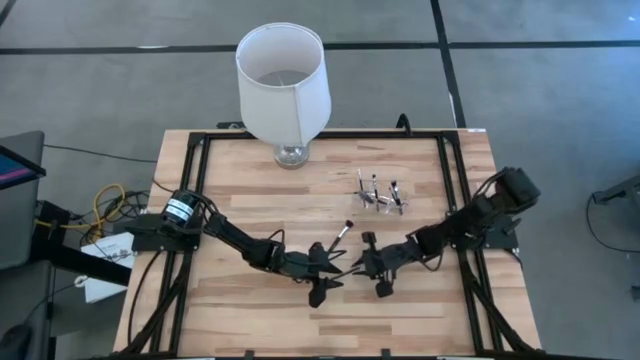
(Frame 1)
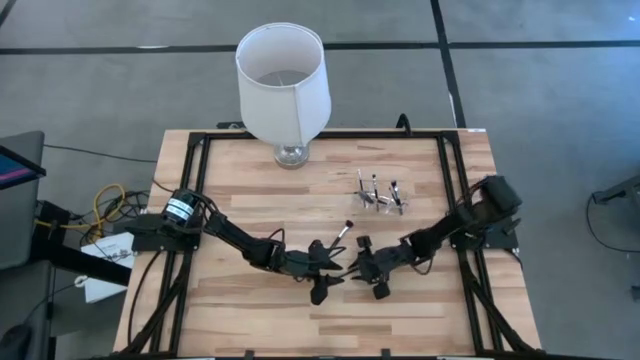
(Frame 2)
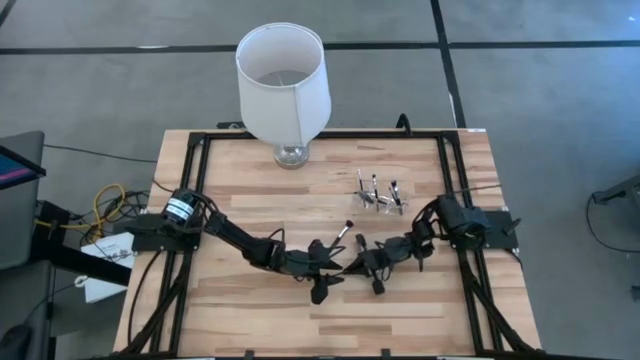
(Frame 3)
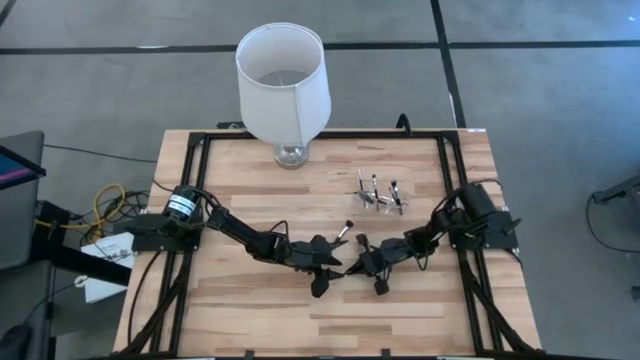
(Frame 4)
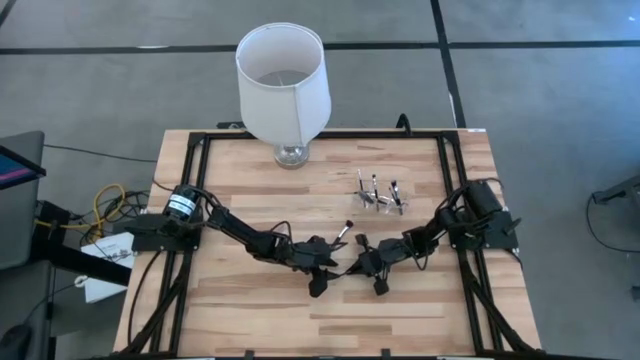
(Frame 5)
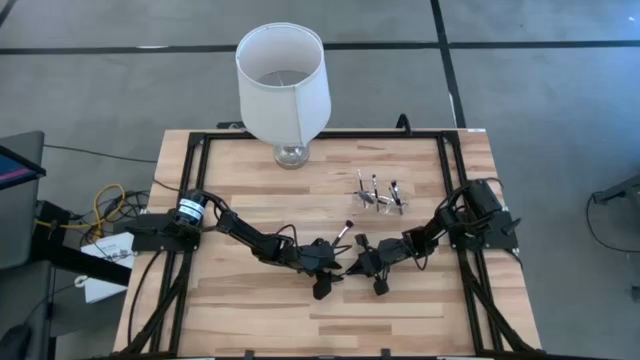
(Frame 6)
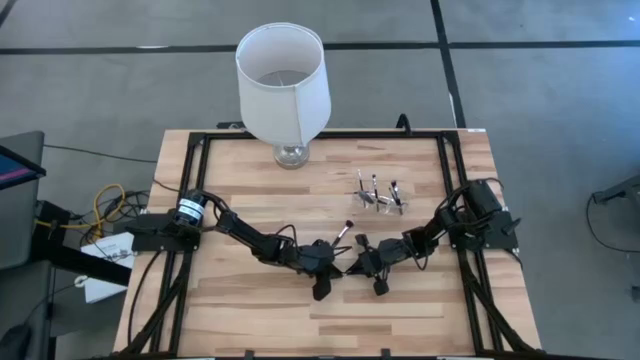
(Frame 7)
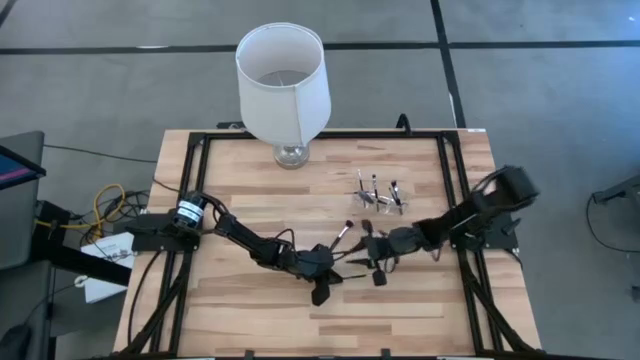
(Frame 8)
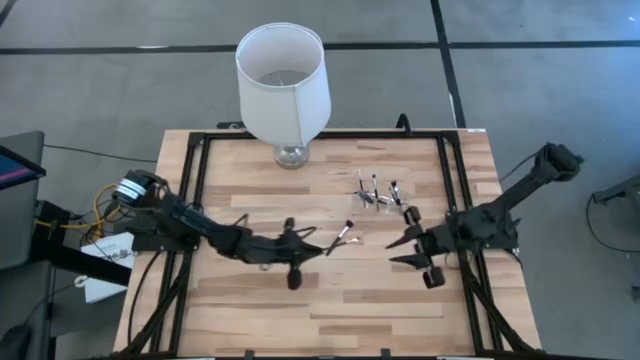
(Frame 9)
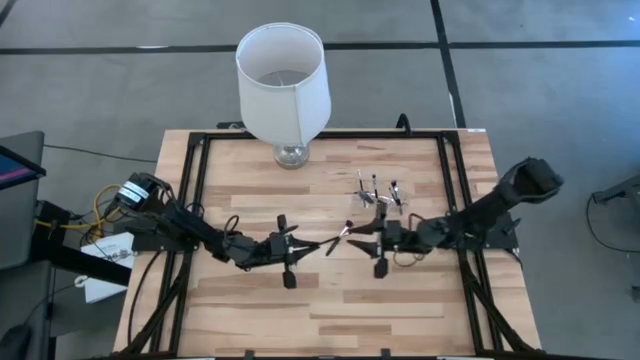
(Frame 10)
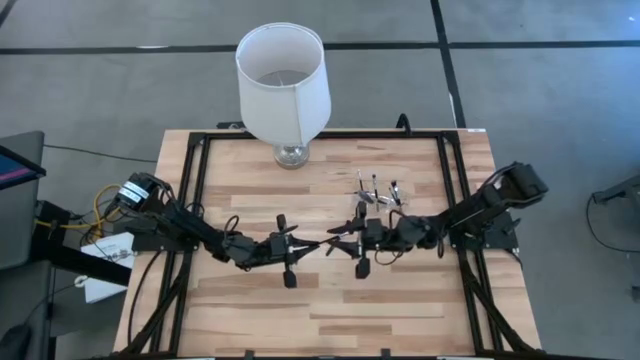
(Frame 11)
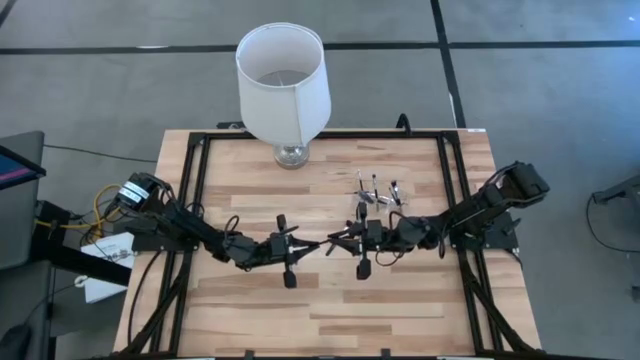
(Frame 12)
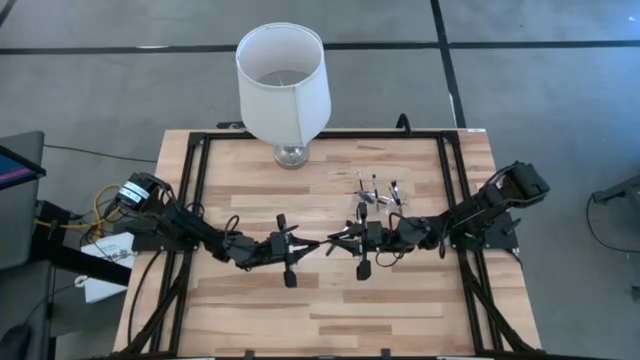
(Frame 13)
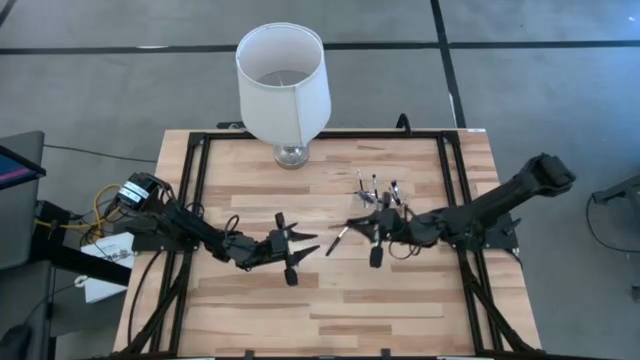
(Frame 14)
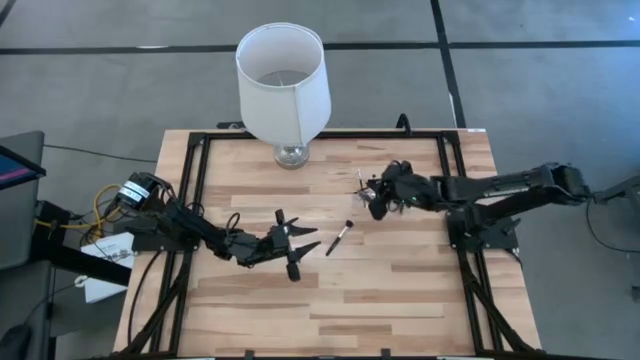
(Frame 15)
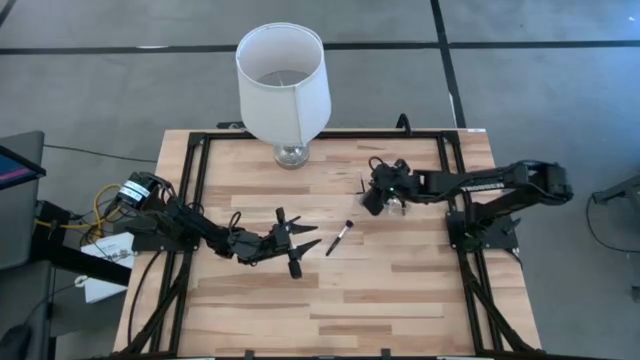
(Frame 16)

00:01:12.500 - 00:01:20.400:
Task: Pick & Place Makeup Supplies
Put the black makeup brush into the transparent organizer

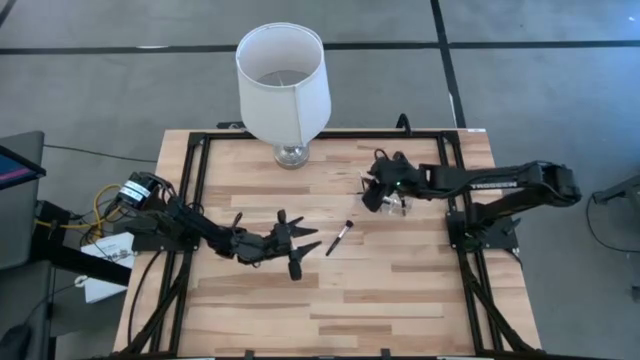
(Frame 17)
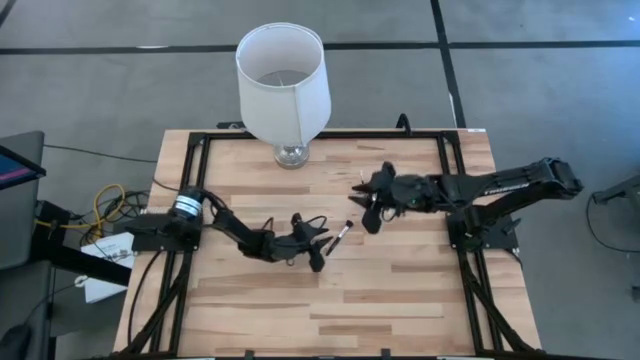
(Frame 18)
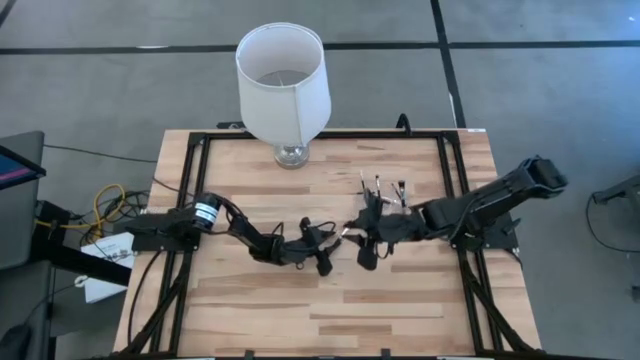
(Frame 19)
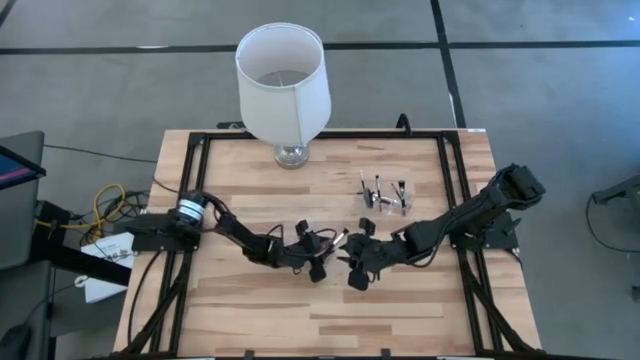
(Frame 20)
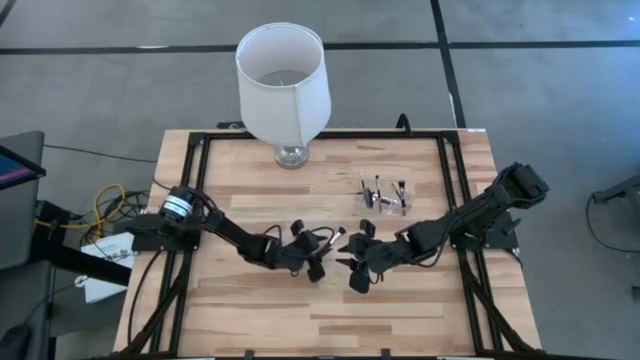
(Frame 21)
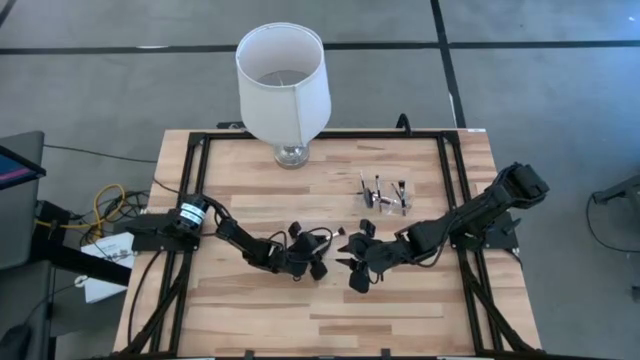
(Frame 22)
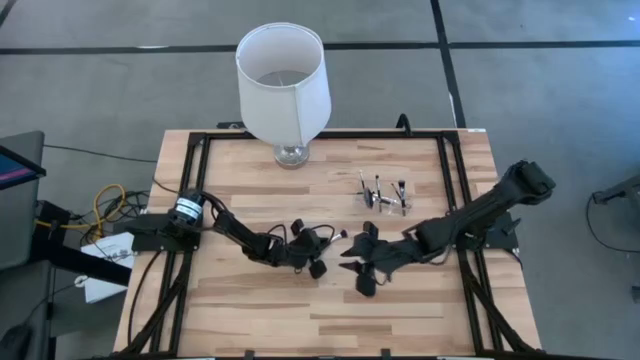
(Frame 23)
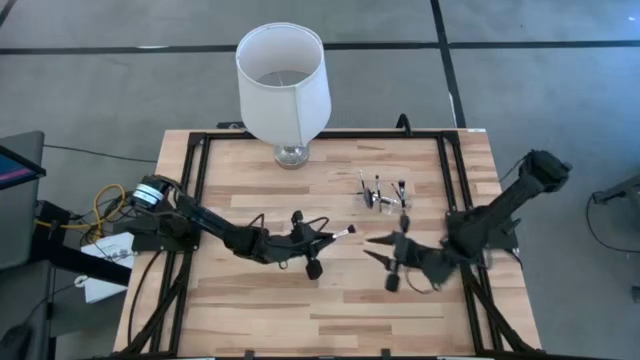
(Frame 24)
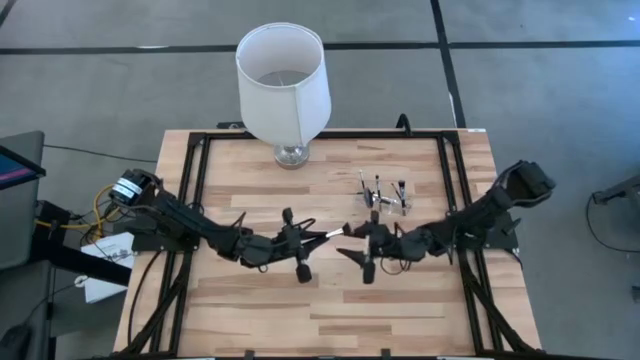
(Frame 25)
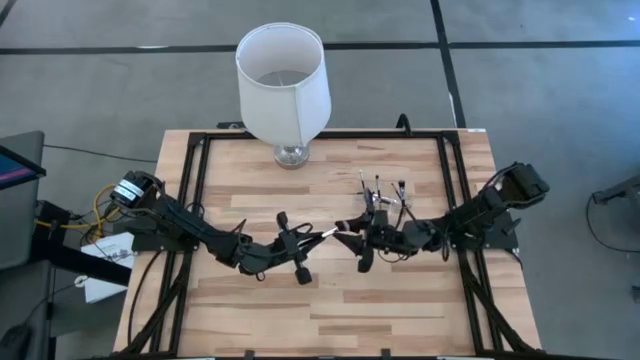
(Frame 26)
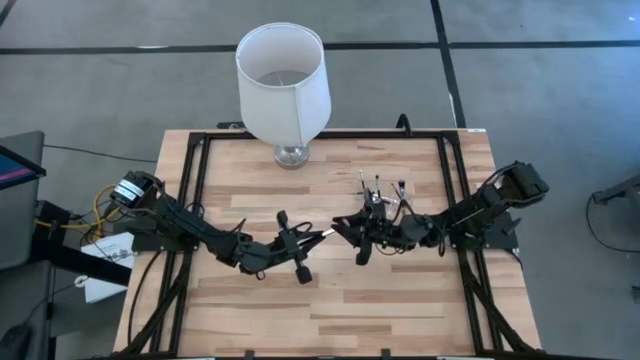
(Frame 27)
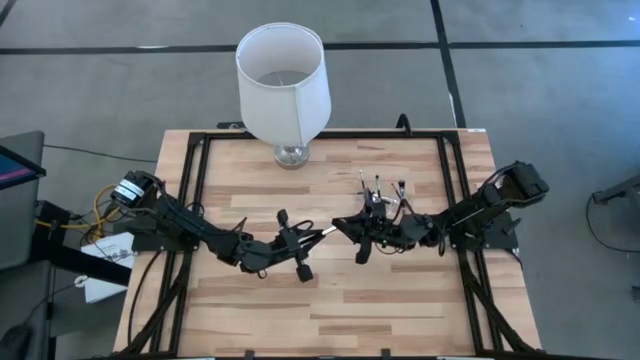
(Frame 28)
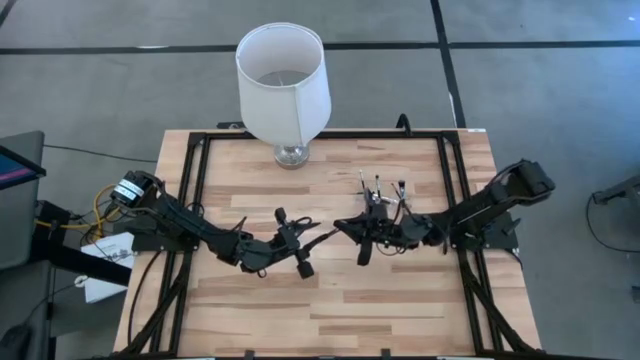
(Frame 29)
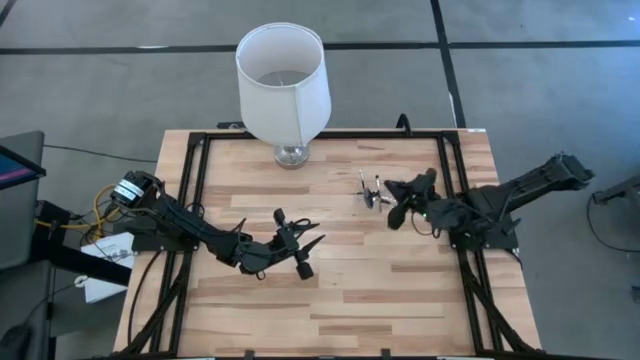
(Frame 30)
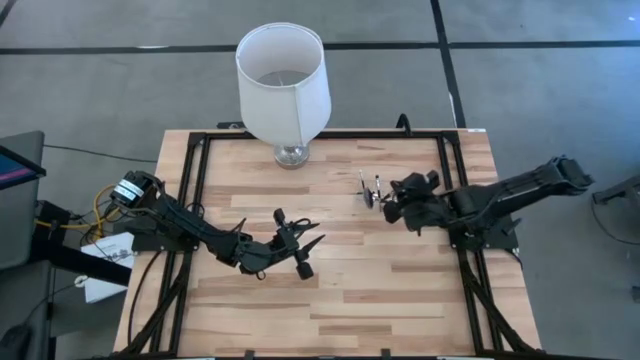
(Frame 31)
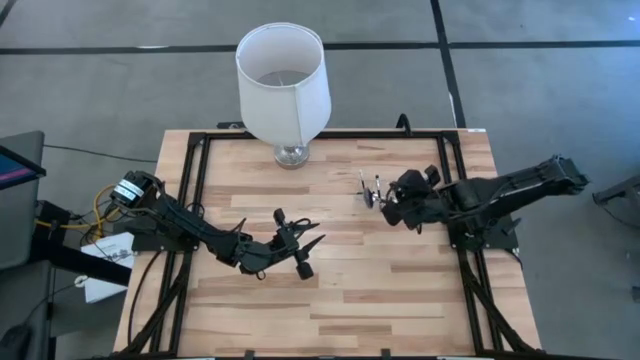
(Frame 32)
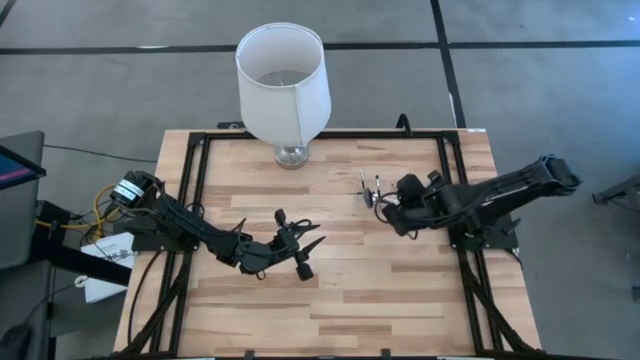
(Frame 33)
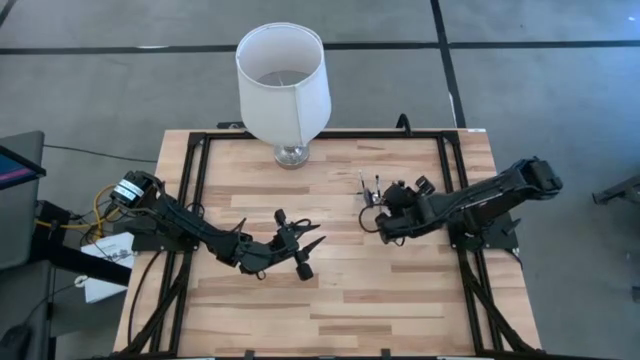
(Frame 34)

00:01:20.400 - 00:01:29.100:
Put the black makeup brush into the transparent organizer

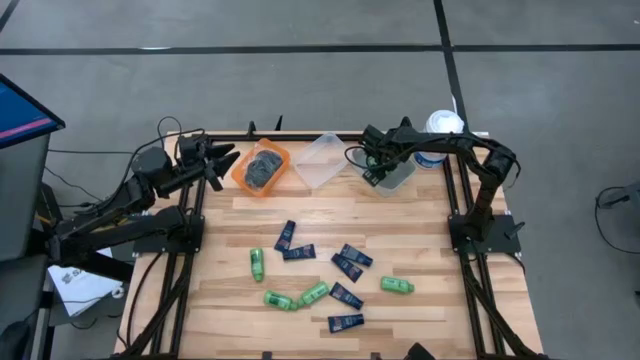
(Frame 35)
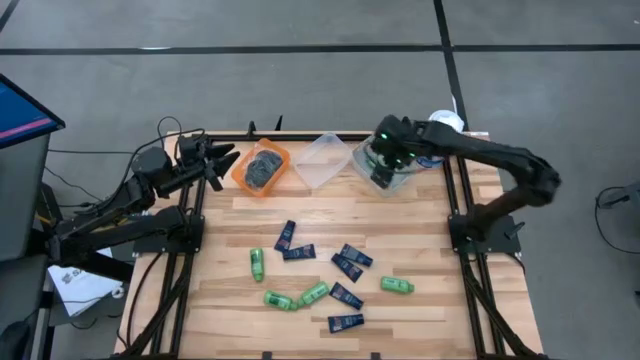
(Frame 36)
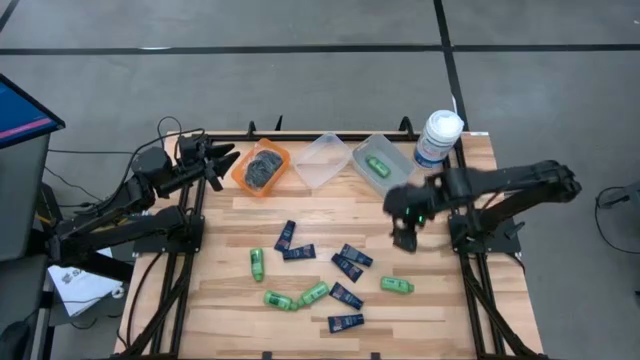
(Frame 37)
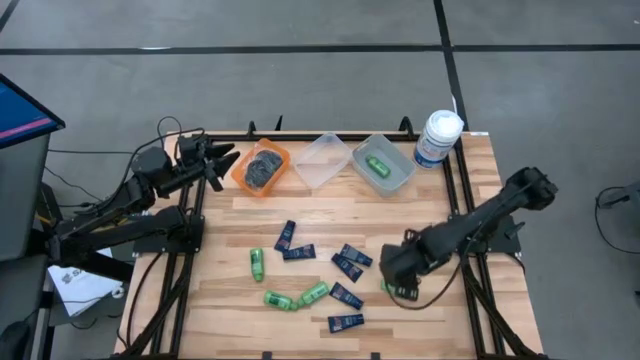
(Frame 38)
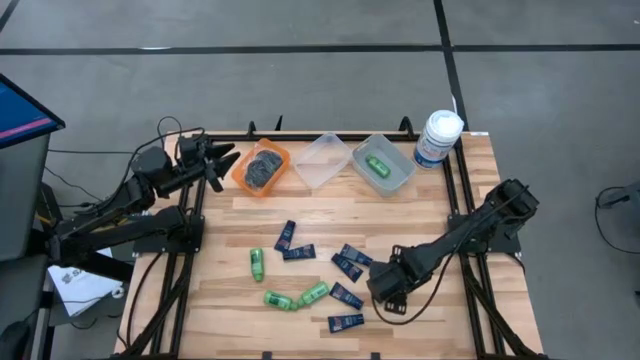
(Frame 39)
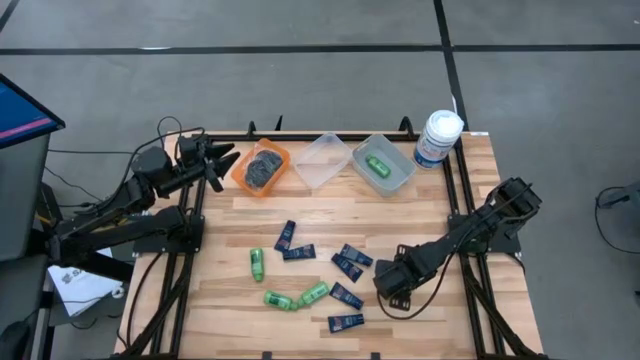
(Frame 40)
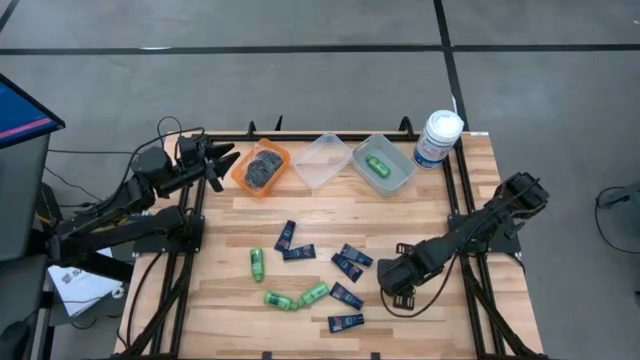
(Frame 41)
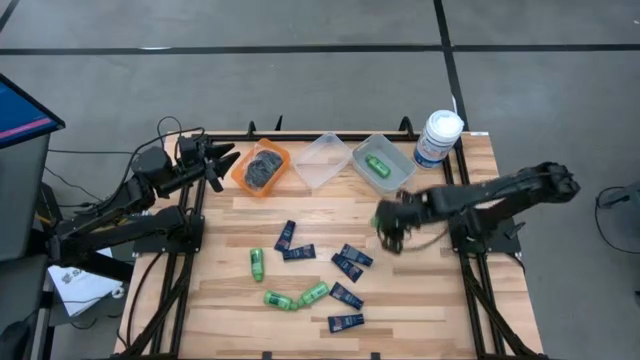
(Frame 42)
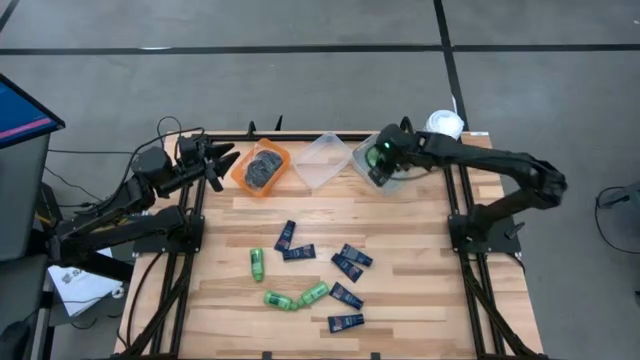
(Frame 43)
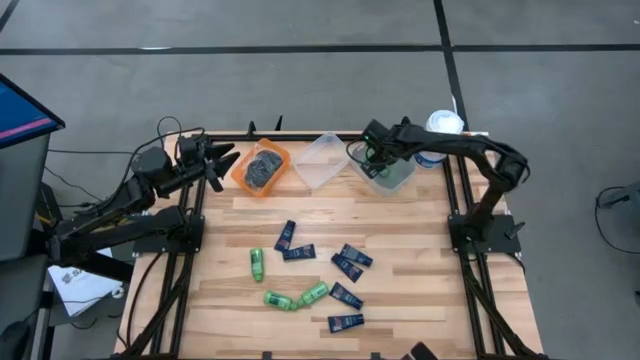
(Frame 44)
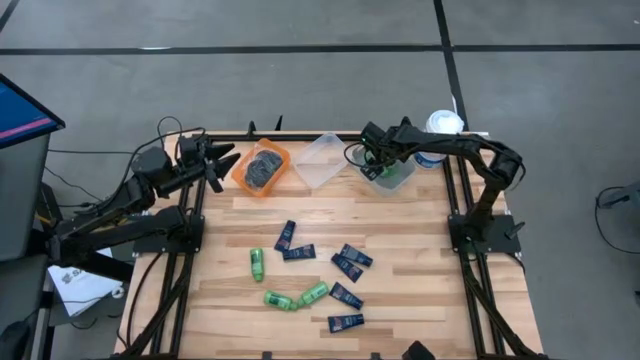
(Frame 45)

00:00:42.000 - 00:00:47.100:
Task: Pick & Place Travel size toiletries
Put the green shampoo into the gray bin
